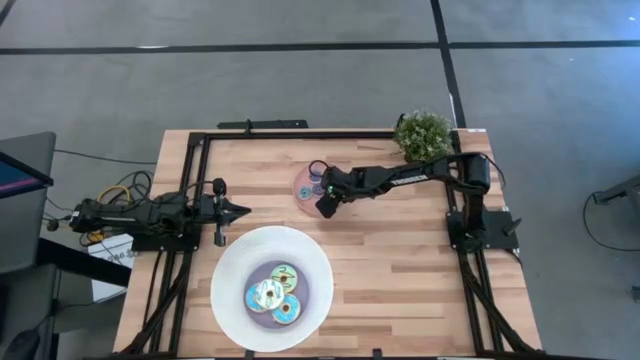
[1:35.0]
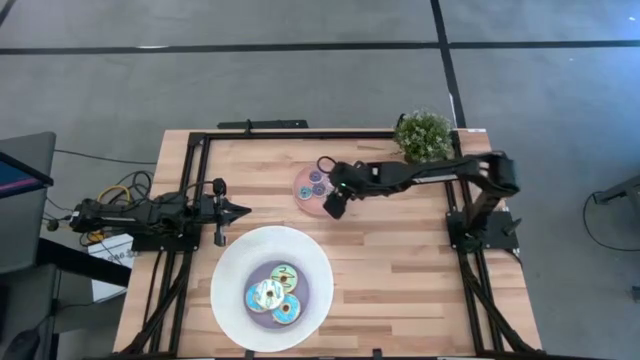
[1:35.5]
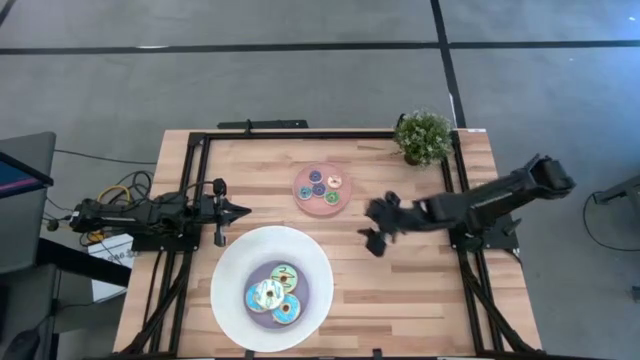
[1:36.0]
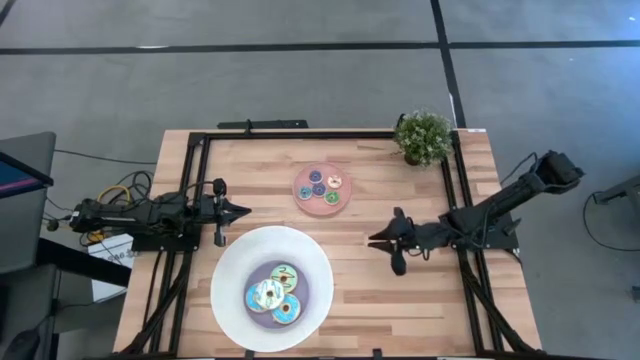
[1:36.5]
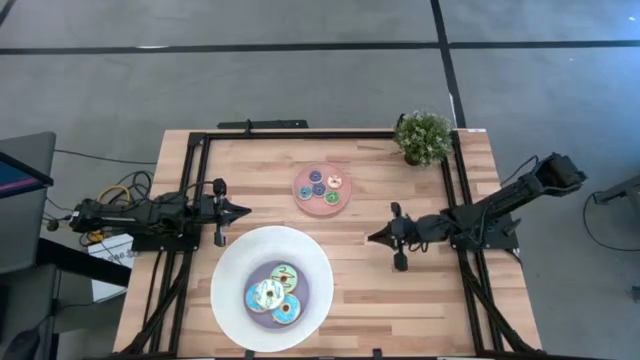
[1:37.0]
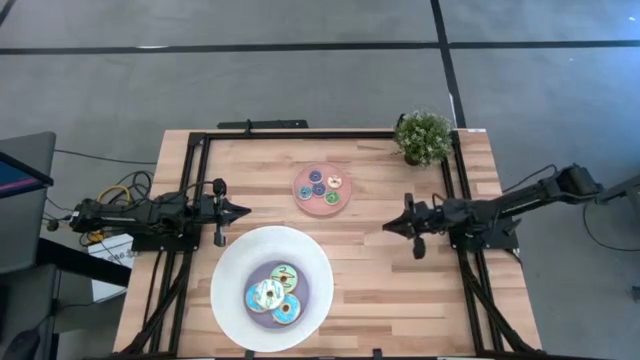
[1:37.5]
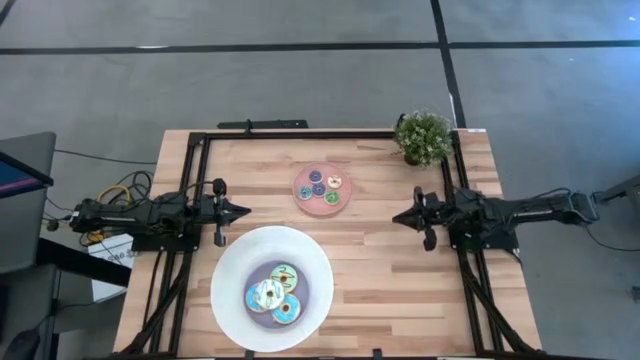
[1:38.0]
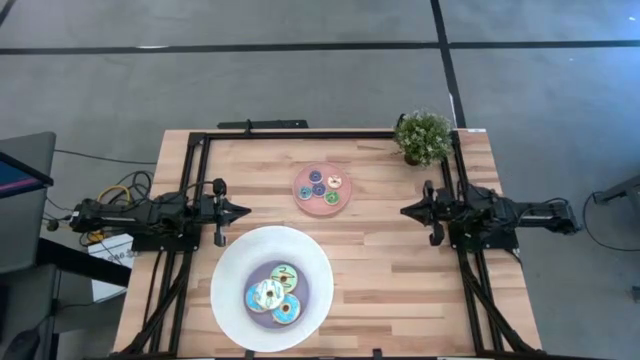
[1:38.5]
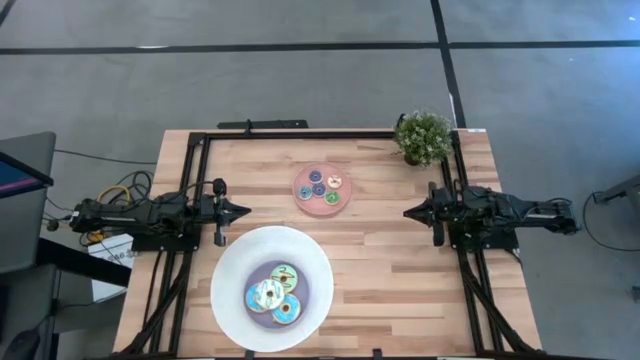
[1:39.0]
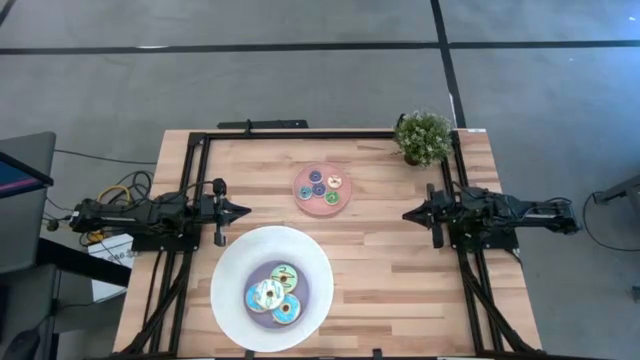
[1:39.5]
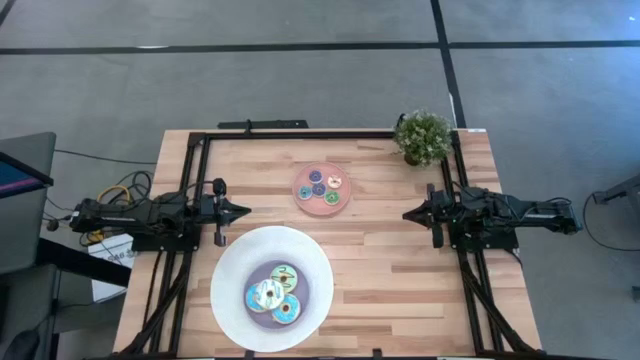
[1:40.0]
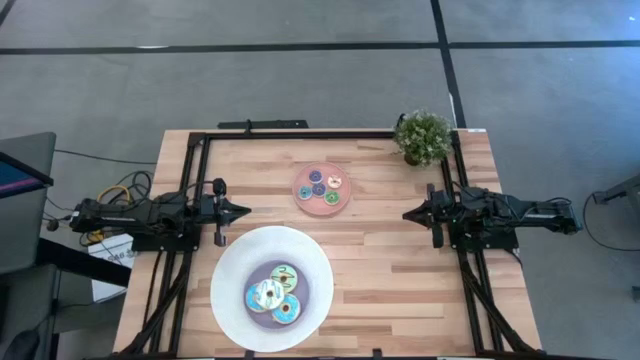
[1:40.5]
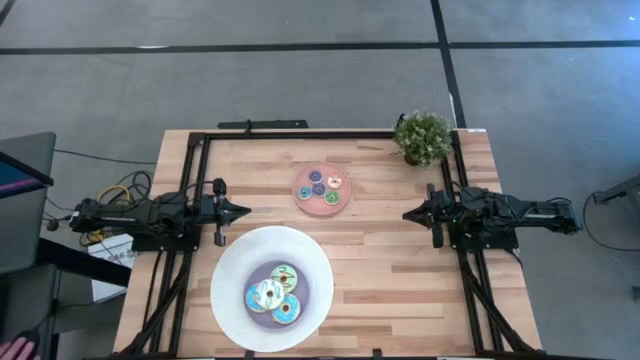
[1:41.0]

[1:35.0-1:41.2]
Task: Pick & Place donuts
Return to Home Position

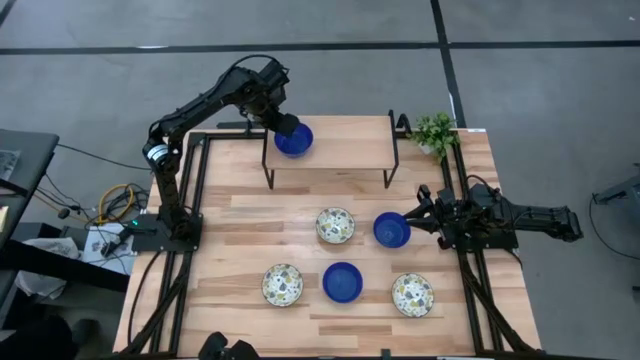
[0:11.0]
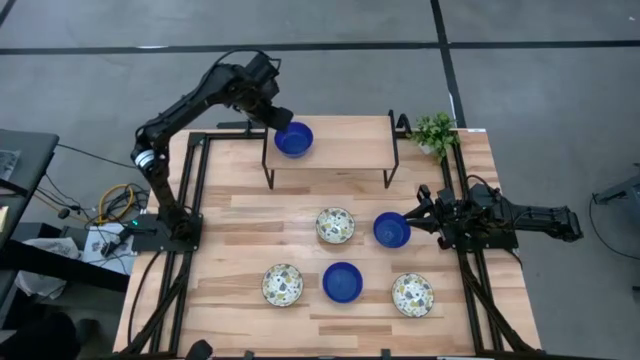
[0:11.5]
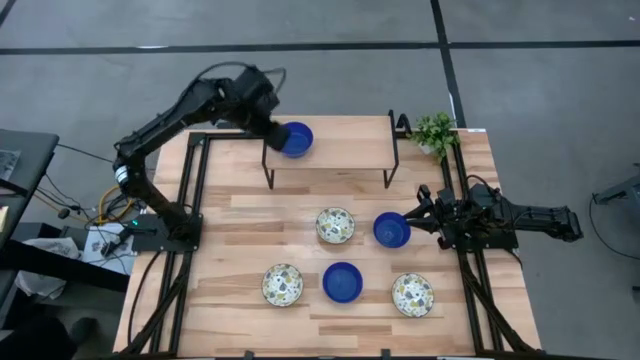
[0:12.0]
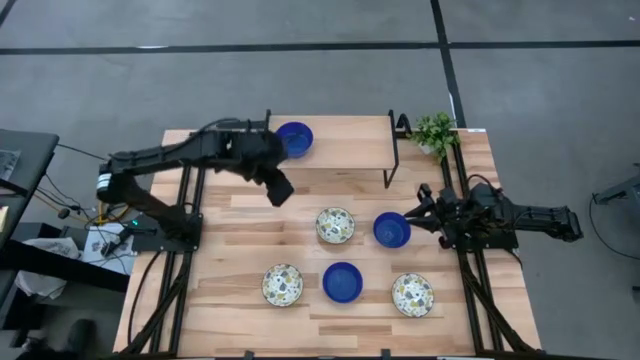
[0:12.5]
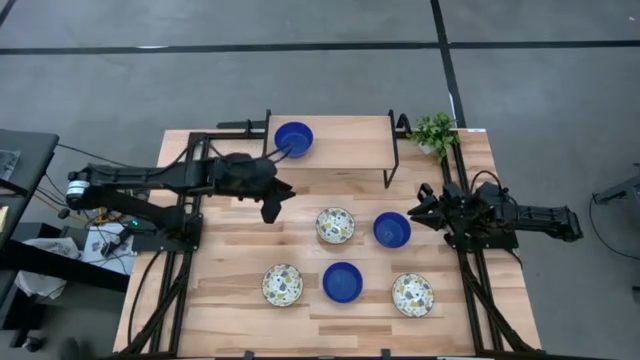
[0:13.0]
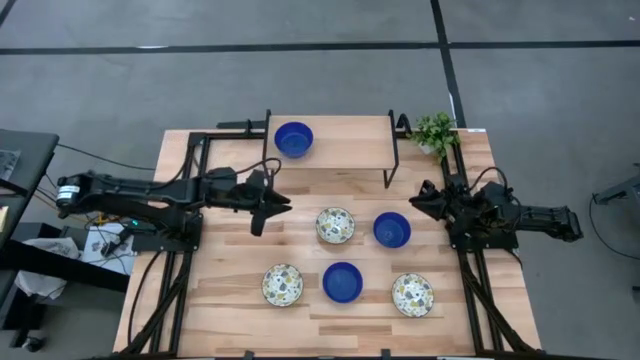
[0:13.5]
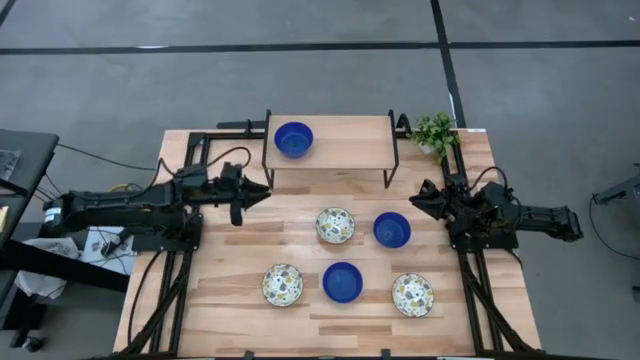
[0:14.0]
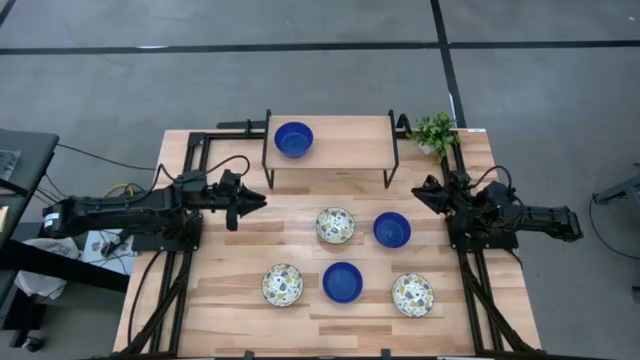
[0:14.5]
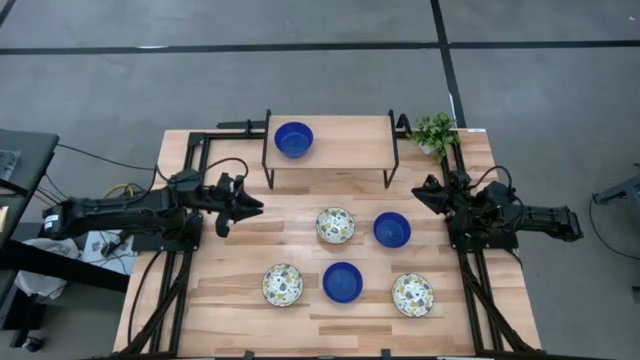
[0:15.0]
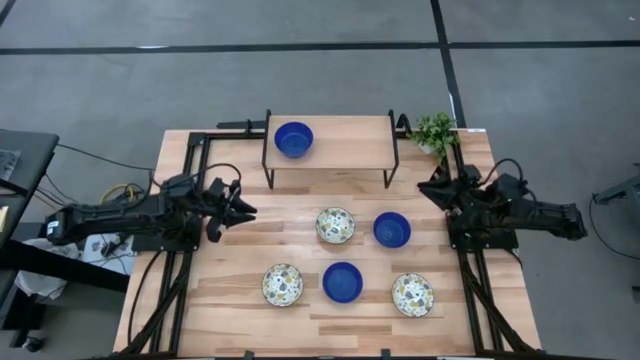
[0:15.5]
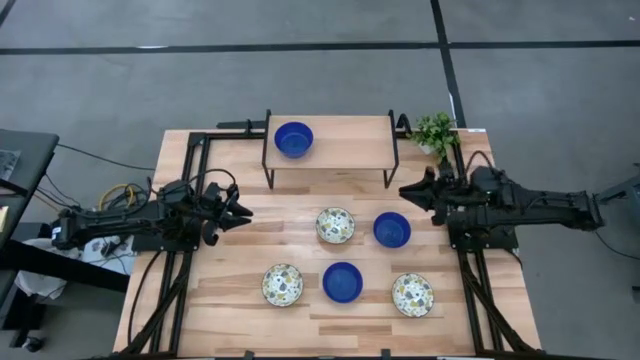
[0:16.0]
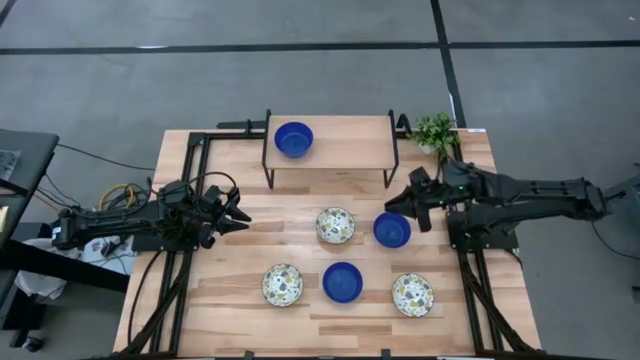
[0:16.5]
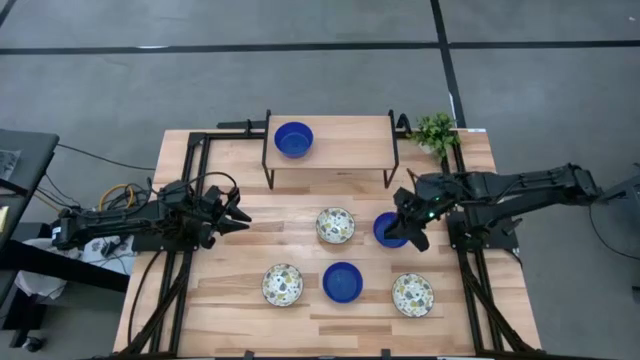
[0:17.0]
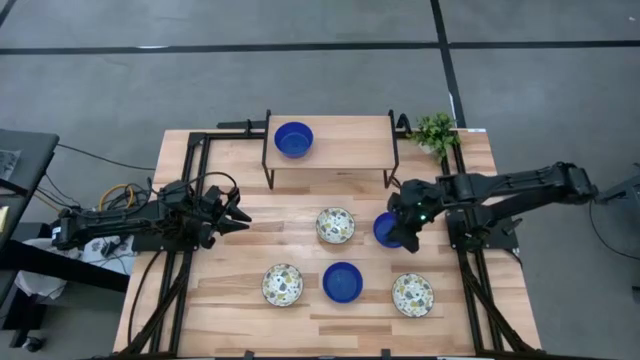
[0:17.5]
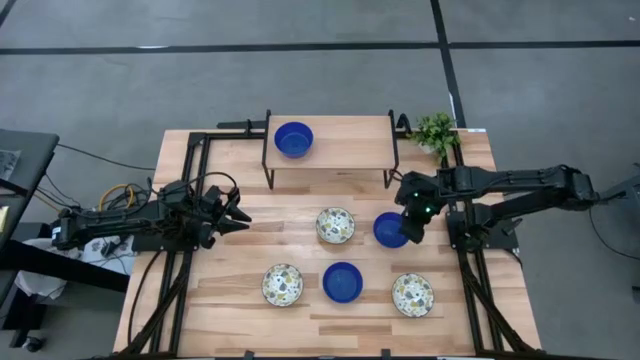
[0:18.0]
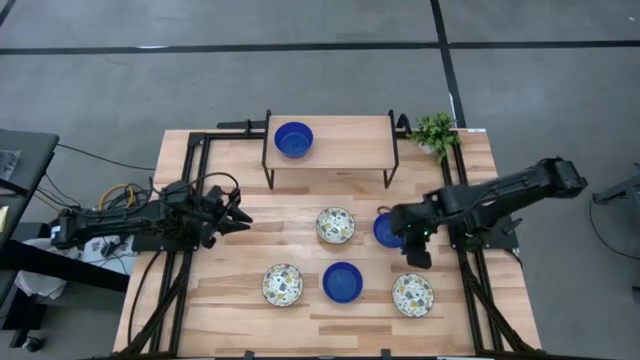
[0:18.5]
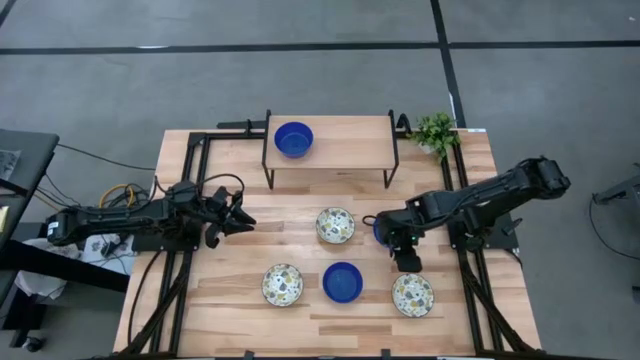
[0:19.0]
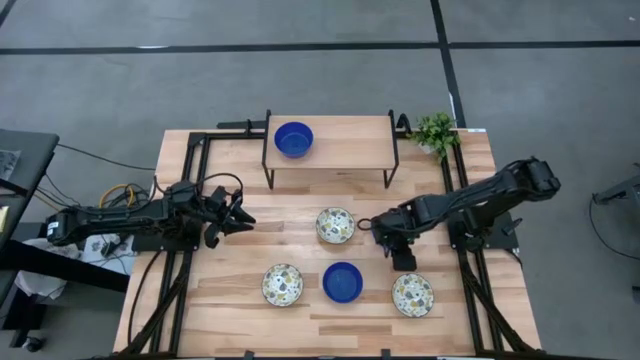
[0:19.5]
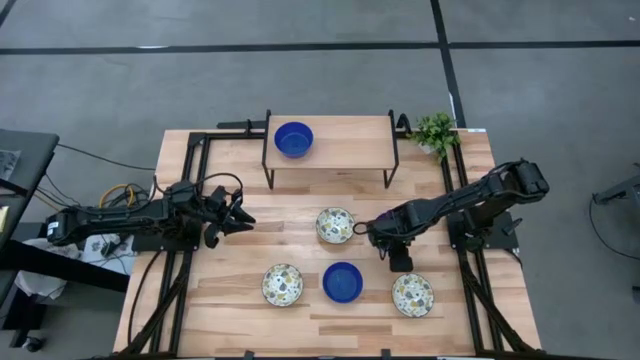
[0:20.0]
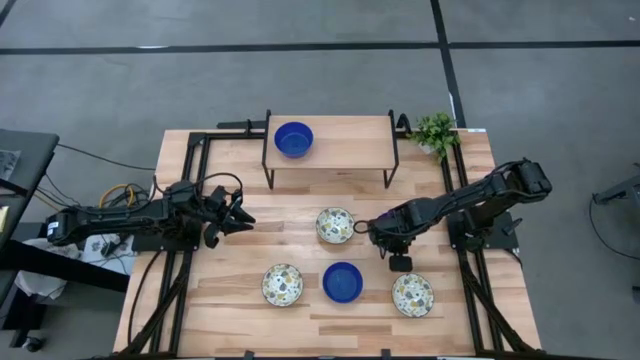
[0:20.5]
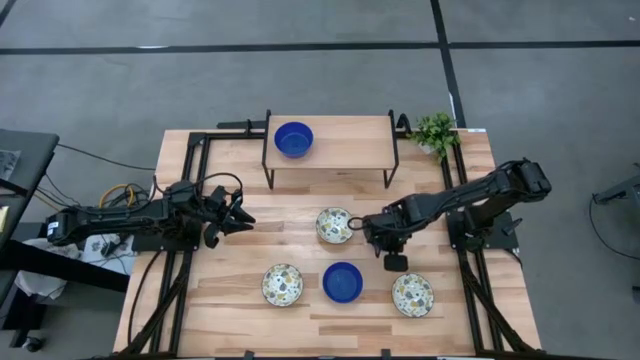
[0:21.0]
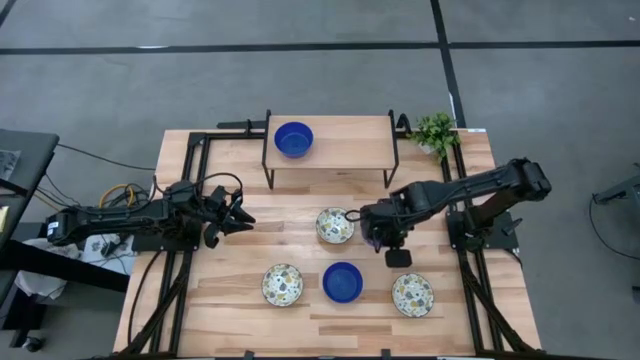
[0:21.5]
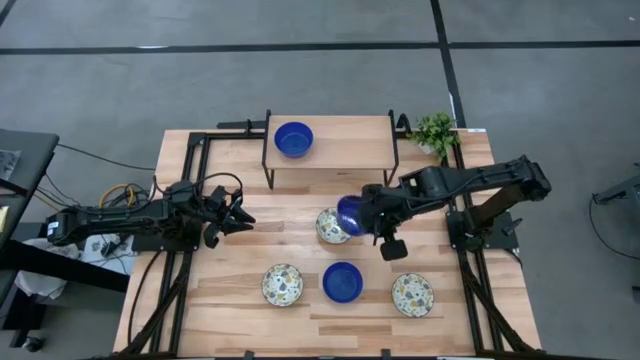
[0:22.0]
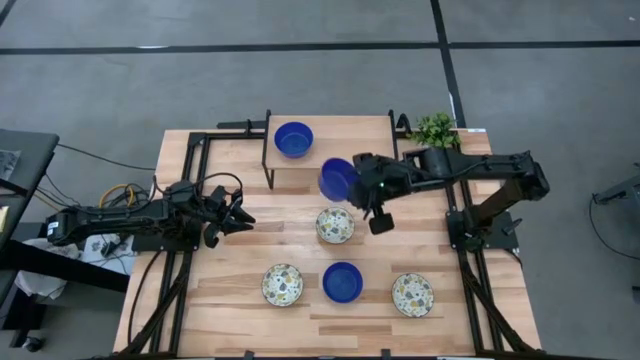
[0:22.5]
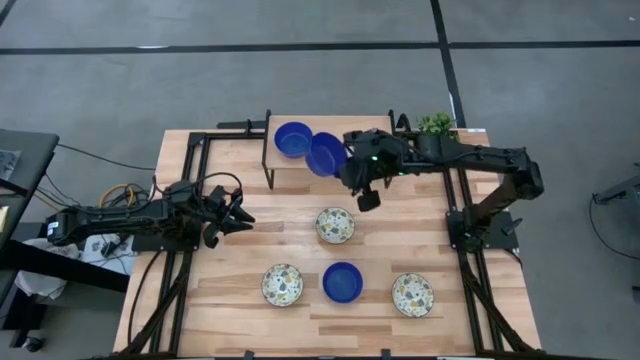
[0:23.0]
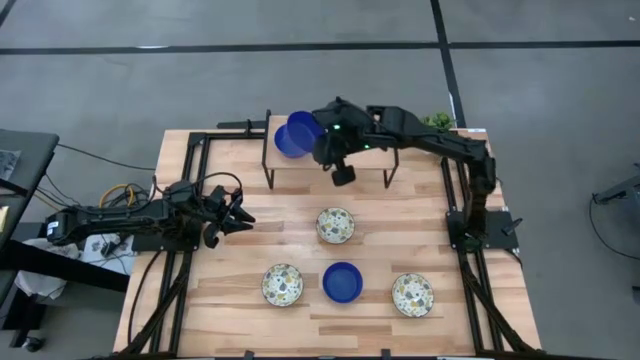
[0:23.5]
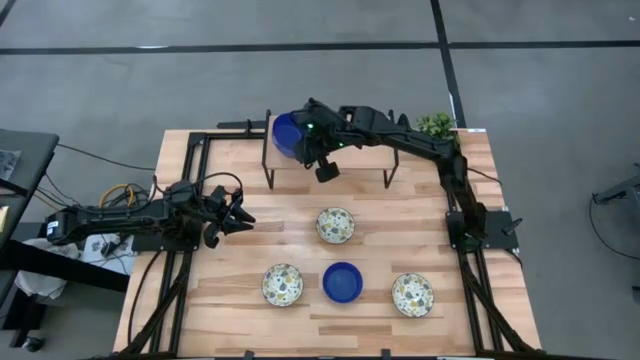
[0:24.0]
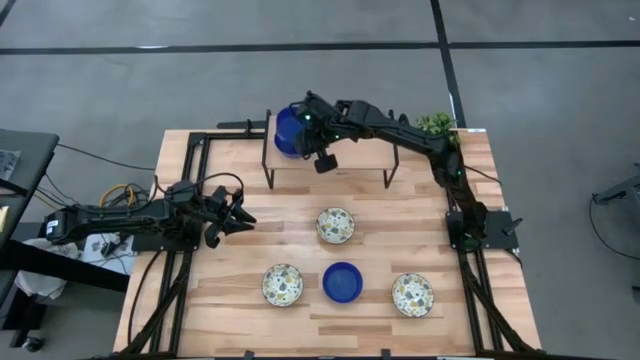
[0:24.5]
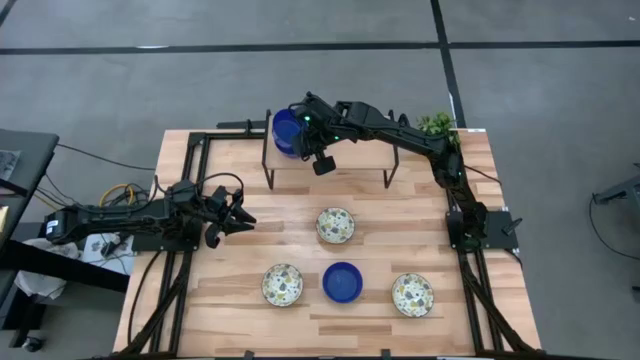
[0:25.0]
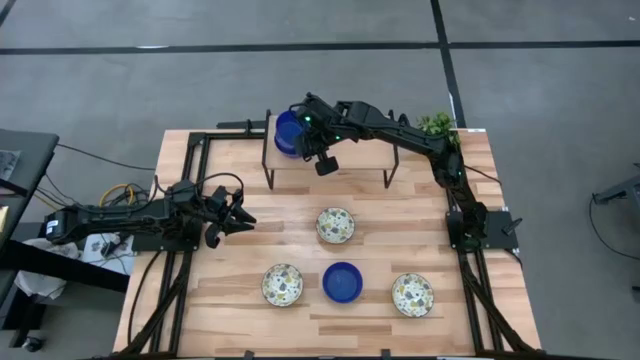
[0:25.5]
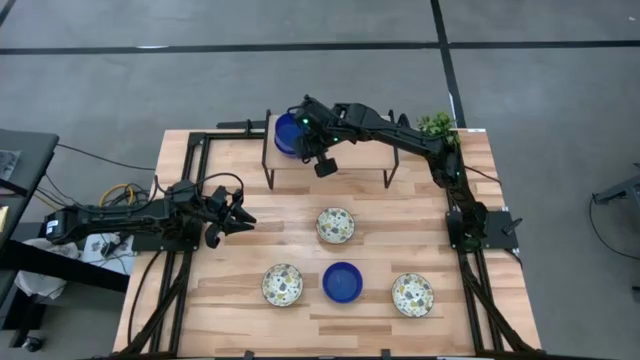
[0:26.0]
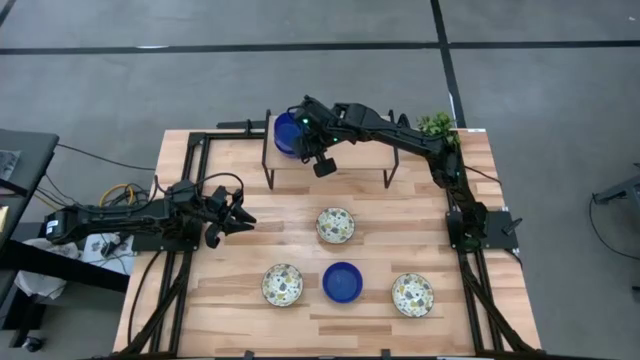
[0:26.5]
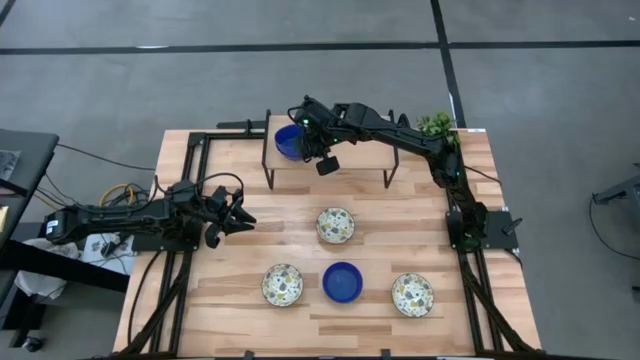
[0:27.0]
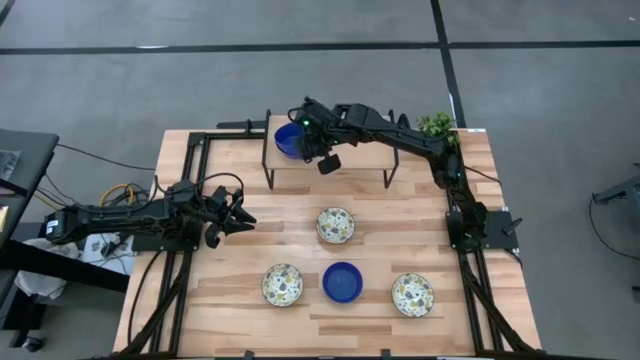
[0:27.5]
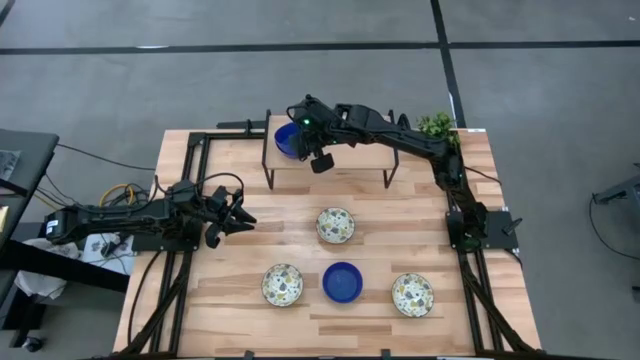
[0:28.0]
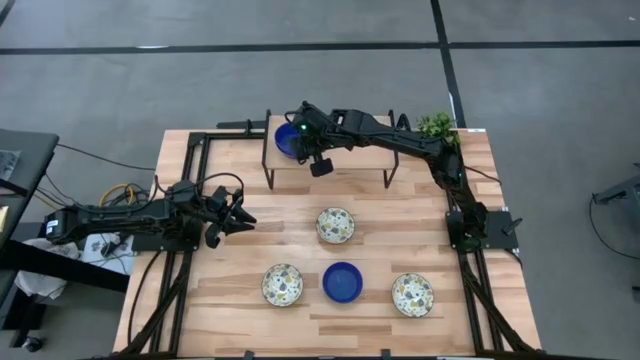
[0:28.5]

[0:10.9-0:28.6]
Task: Pick & Place Mini bowls
Stack the top blue bowl on the blue bowl on the shelf
